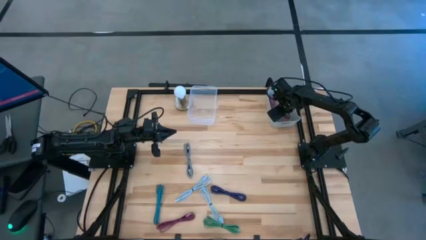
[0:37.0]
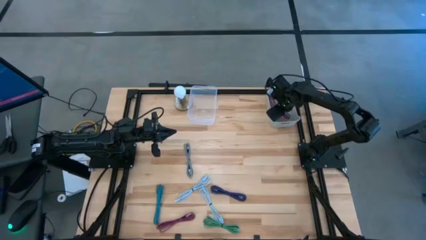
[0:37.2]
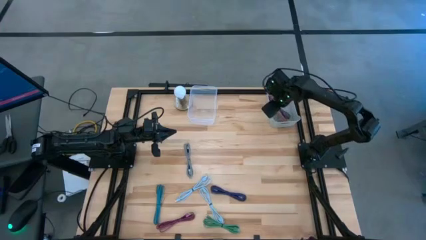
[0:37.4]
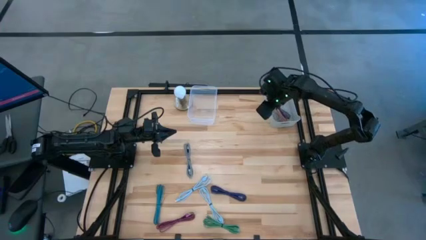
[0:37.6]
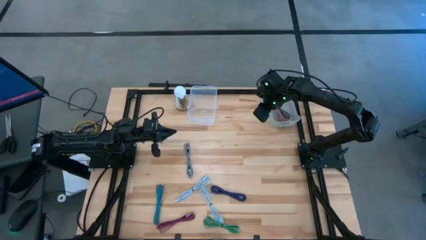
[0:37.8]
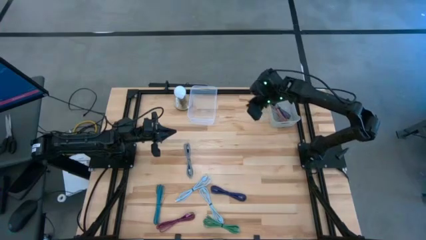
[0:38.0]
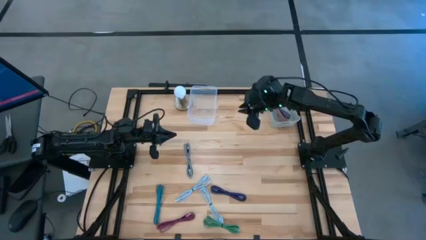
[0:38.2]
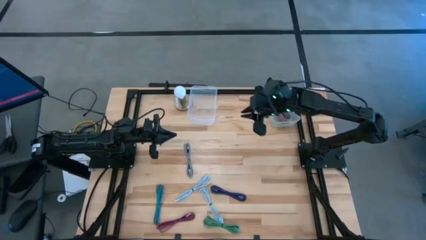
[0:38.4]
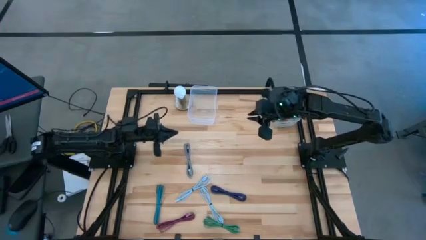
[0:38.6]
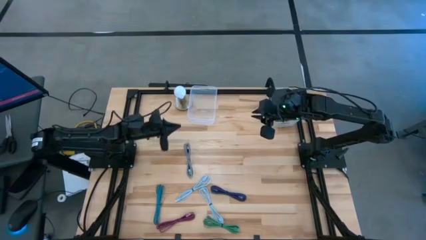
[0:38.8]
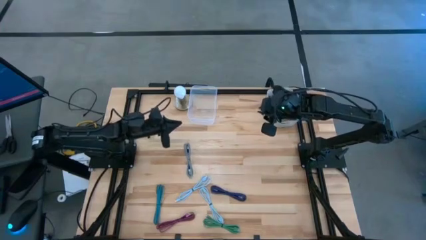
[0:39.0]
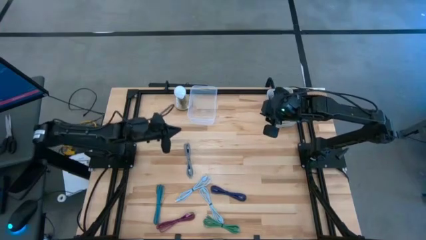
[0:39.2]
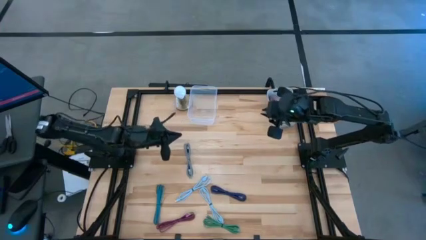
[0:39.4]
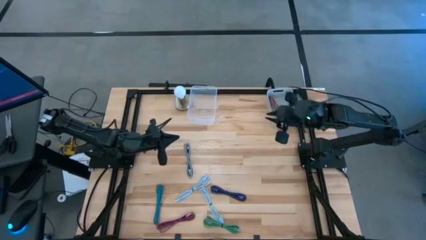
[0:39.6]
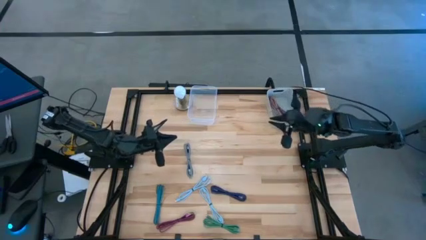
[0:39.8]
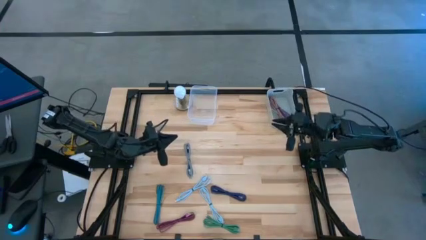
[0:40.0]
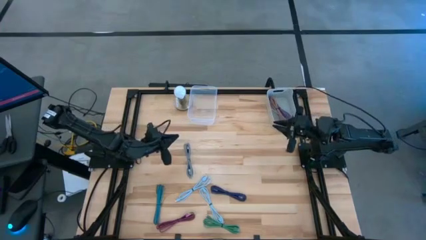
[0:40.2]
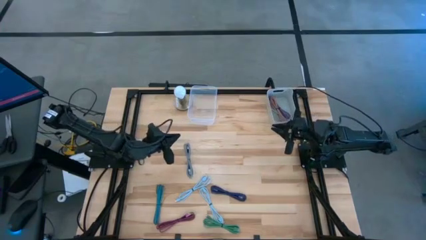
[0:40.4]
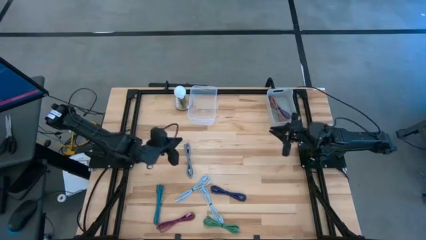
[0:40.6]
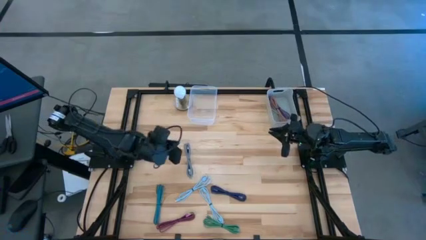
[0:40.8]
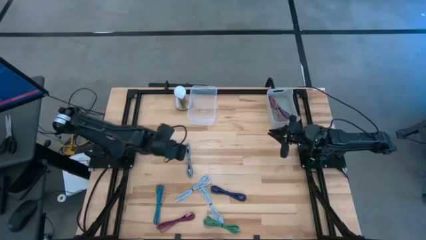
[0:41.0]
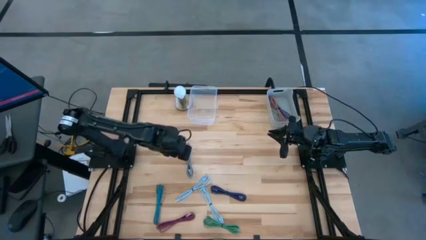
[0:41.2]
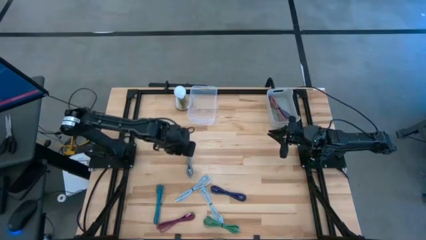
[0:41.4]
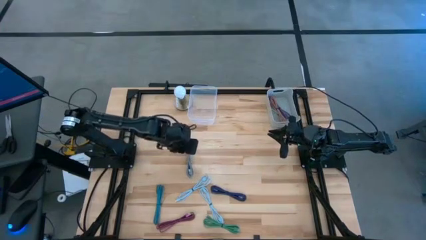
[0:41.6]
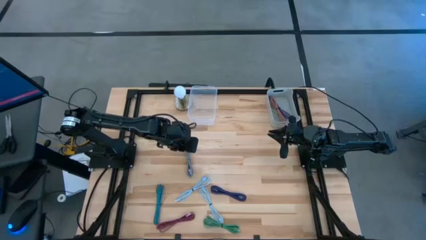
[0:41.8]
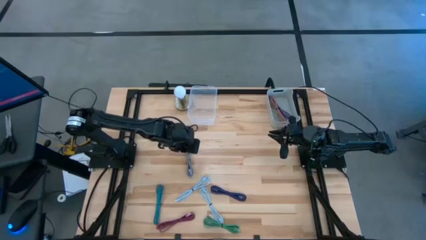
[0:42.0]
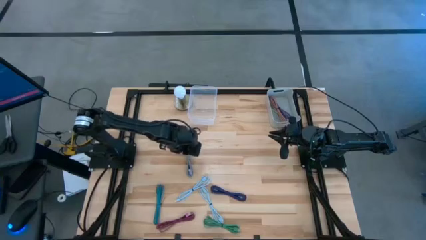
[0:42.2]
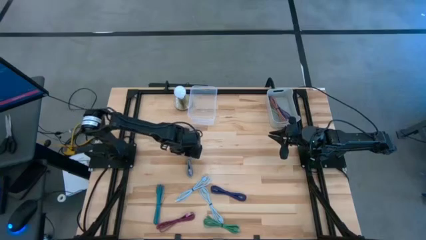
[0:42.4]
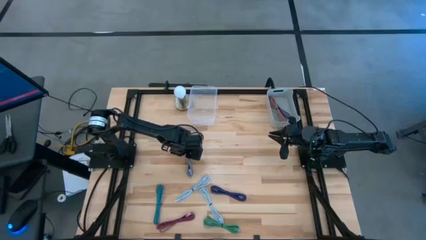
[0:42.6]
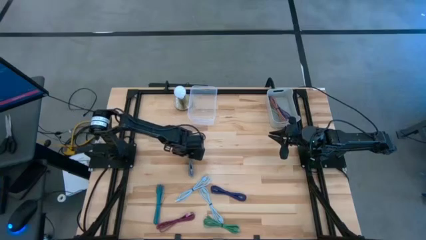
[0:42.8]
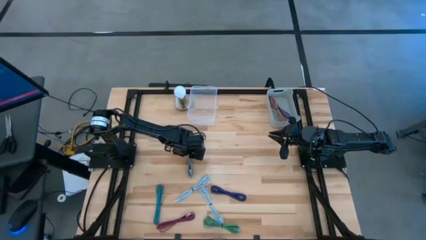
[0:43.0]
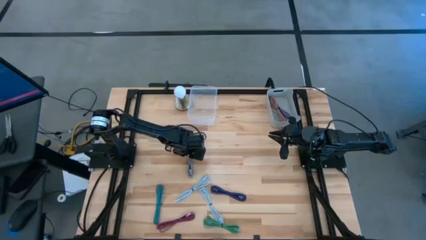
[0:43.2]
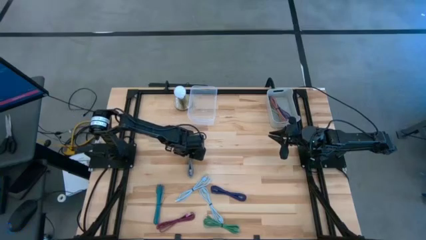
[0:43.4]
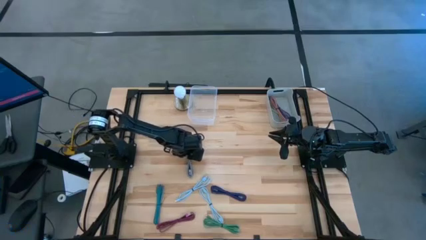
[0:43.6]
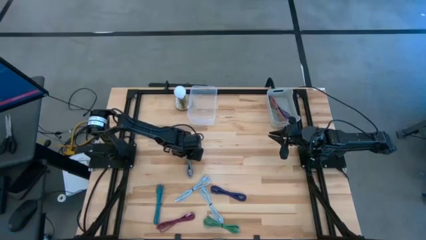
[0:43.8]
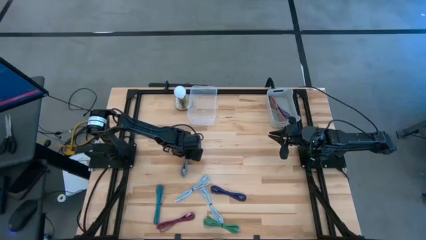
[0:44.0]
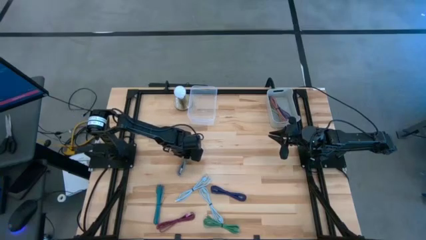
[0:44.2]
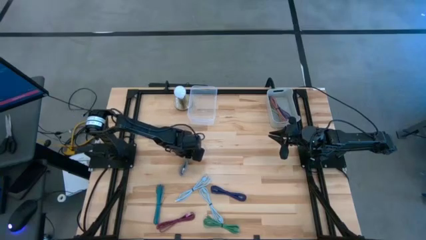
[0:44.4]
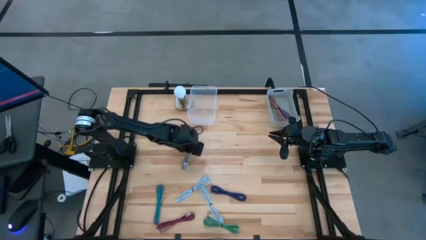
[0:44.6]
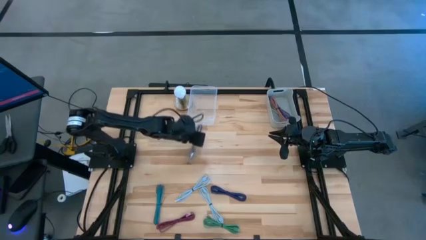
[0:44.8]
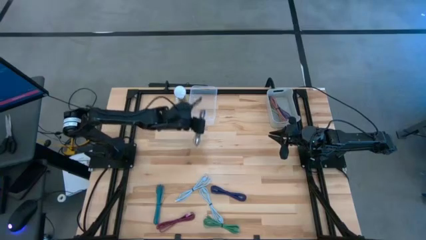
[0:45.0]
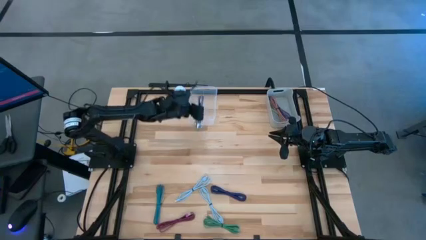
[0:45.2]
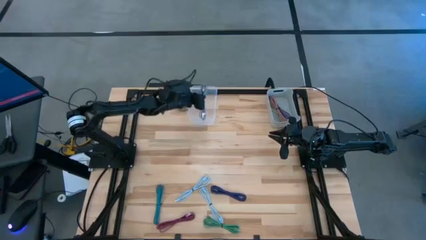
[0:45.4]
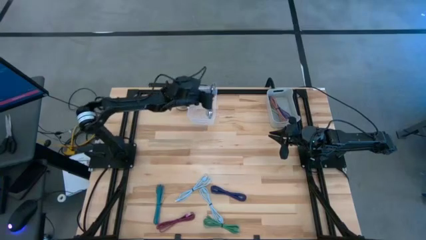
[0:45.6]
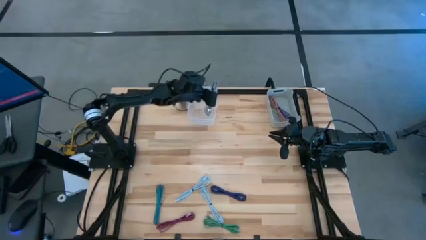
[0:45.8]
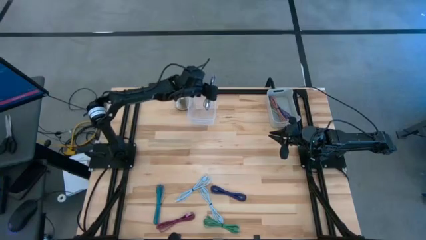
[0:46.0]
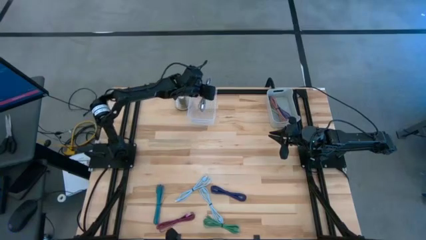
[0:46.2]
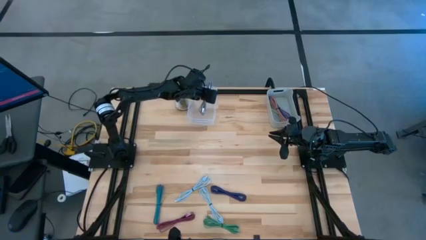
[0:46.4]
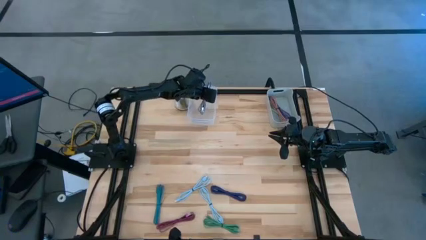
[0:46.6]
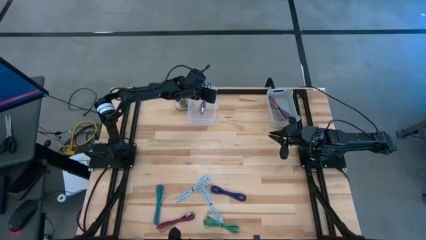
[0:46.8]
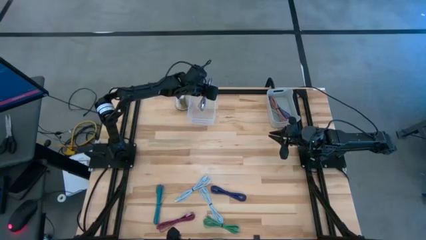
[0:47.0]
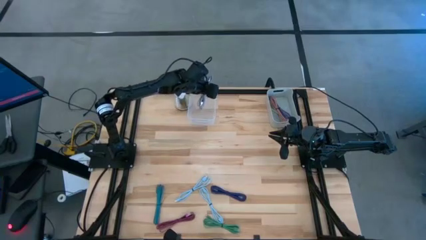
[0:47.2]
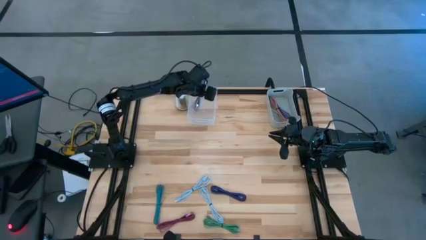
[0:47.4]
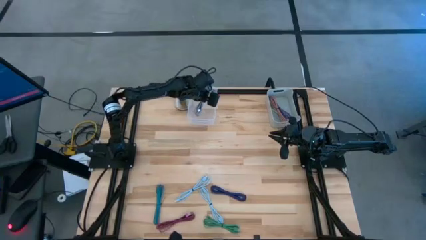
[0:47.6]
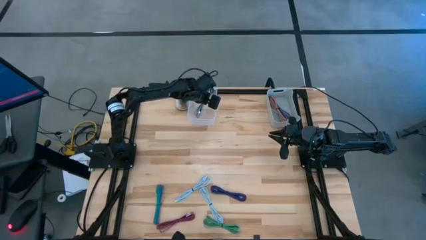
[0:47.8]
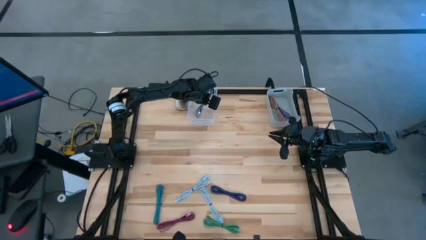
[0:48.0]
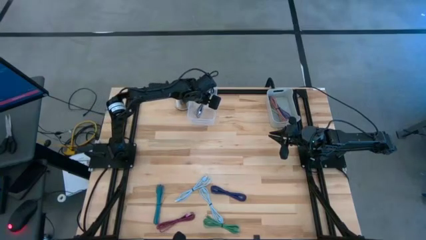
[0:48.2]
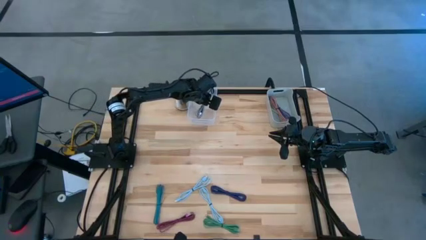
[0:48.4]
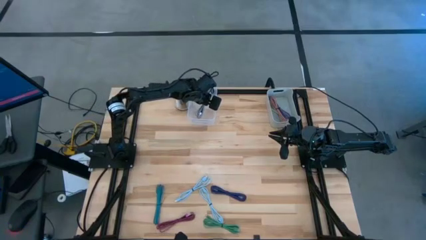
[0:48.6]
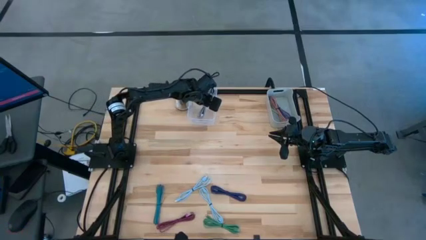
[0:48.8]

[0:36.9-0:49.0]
Task: Pick & Place USB Port
Put the black white charger cable into the transparent bin

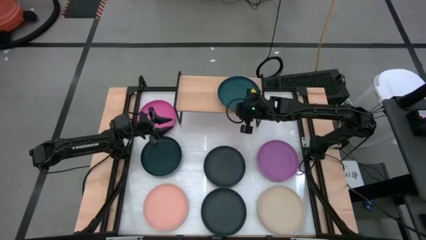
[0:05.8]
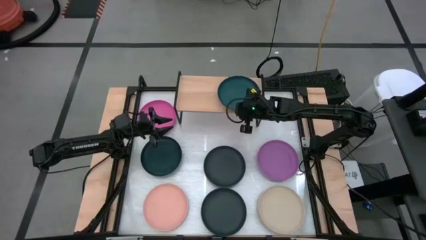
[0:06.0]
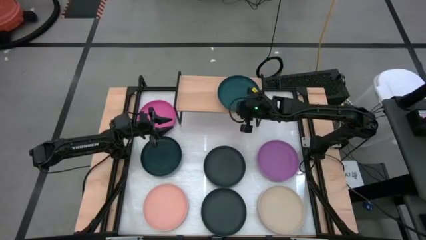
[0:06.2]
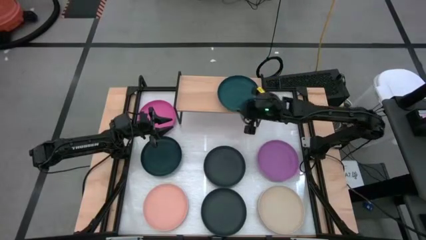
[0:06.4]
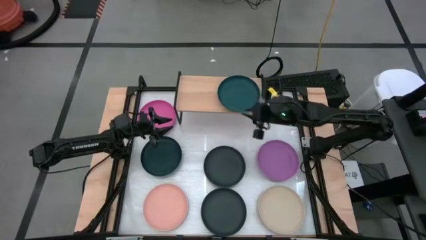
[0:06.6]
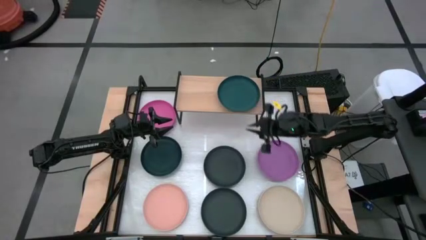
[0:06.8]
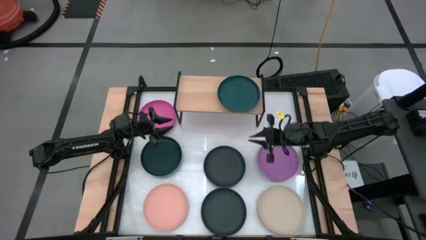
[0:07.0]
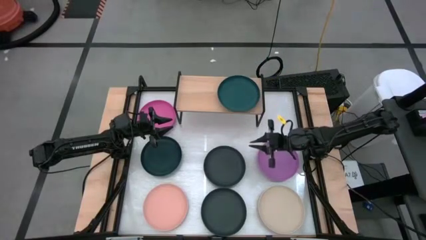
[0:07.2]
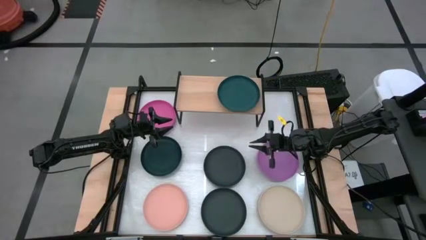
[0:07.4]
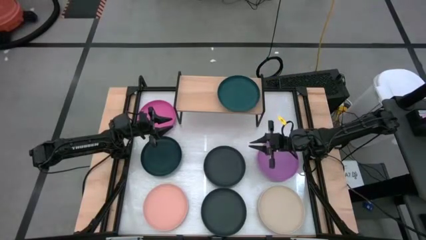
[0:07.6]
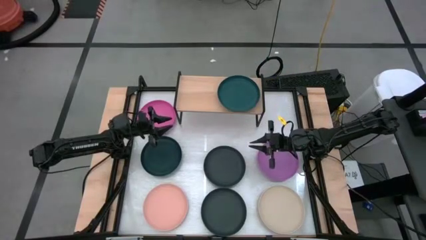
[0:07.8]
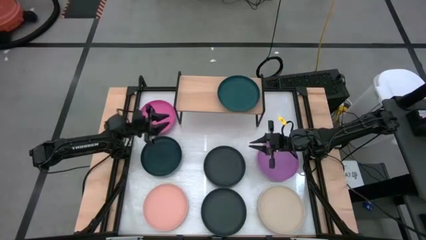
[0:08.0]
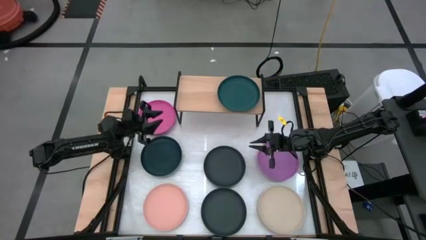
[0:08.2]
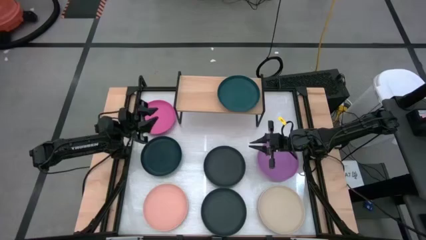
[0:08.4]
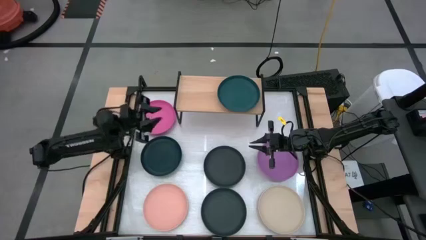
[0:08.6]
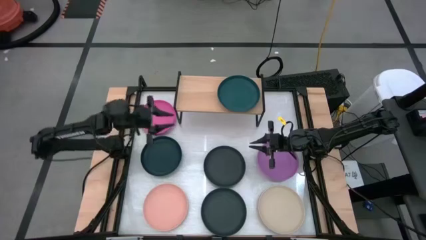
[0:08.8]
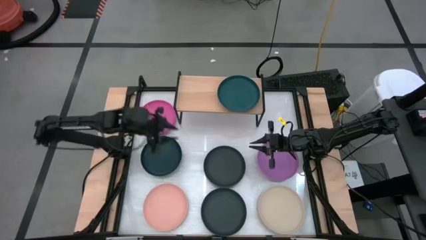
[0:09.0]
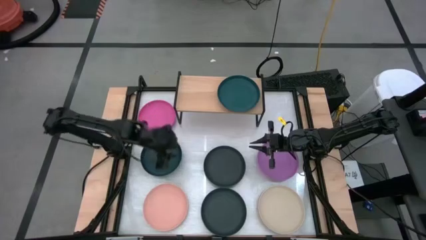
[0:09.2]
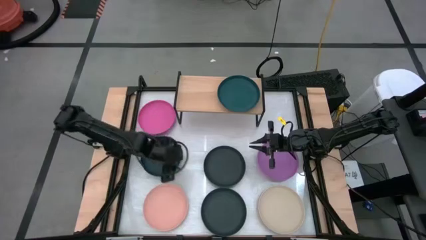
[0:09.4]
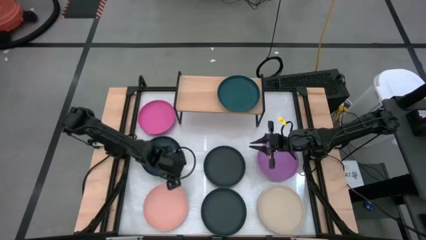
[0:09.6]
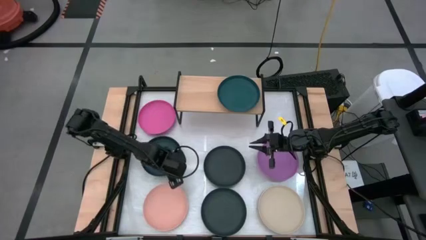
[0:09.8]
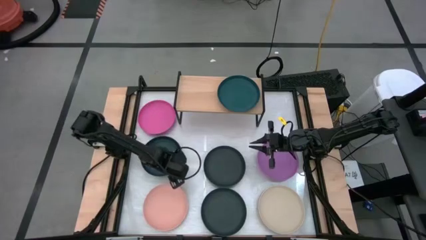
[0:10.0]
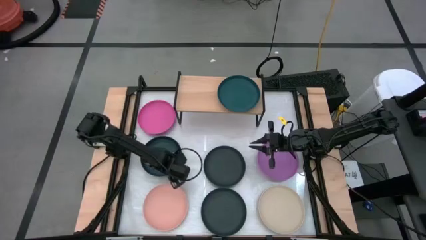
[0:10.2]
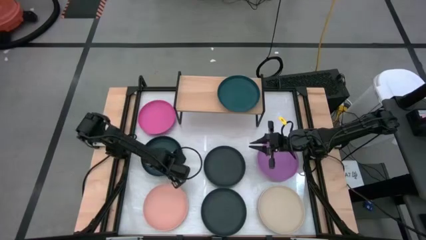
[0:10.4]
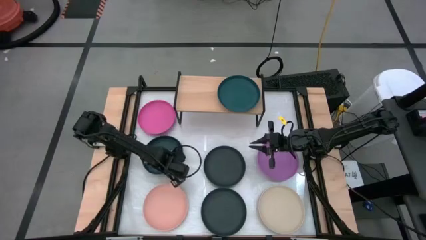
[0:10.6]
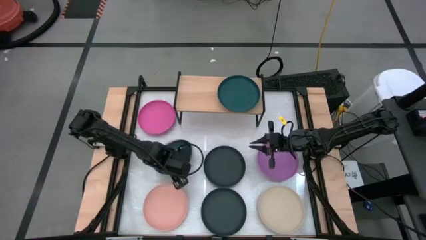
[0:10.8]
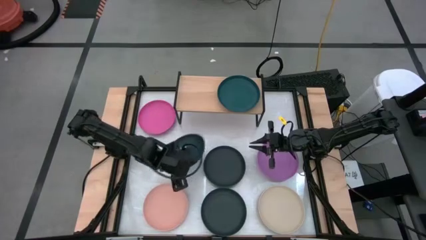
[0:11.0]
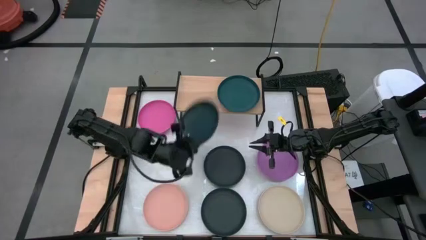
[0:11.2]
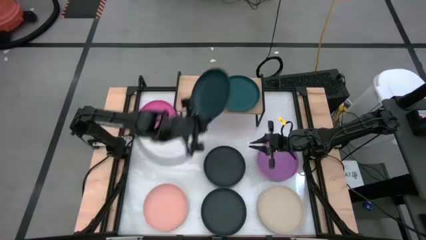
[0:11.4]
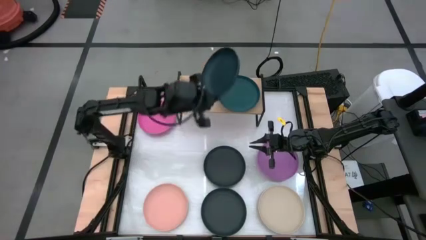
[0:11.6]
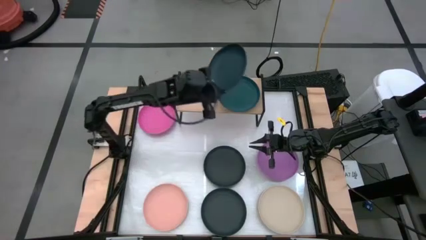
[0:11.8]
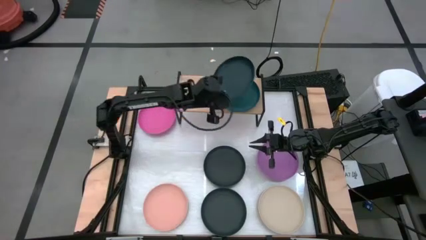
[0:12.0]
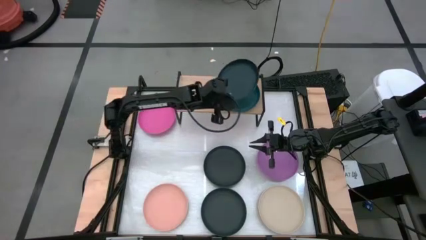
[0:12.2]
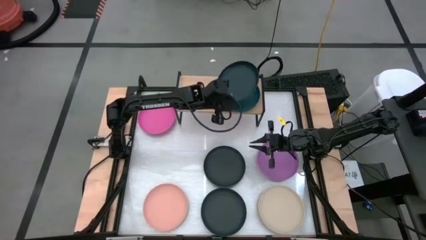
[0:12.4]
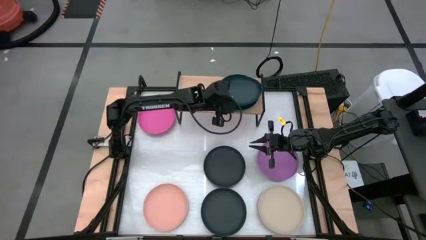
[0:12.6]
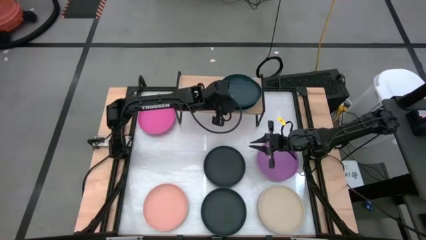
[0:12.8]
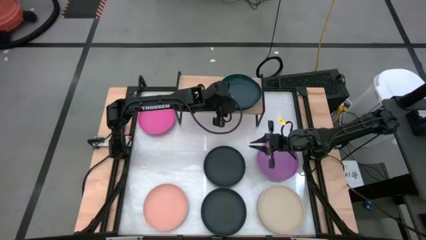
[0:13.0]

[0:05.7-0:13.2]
Task: Place and stack plates onto a shelf
Stack the green plate on the green plate
